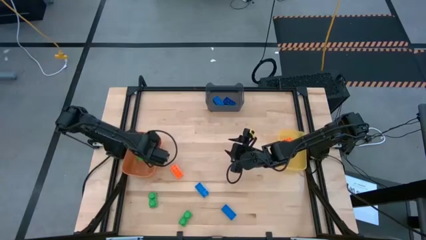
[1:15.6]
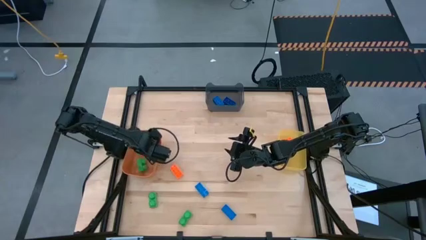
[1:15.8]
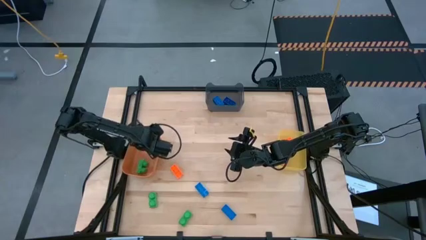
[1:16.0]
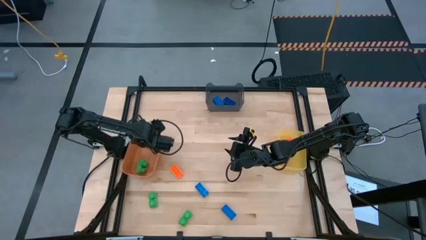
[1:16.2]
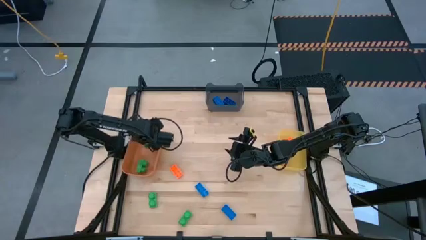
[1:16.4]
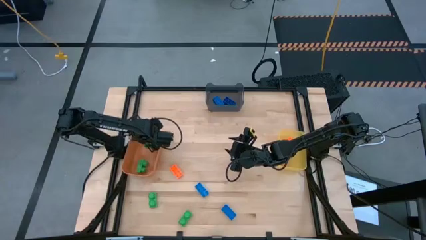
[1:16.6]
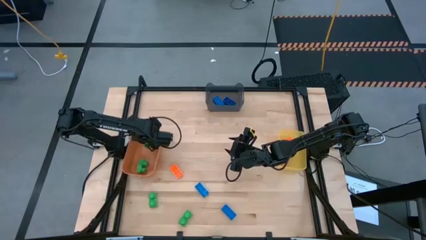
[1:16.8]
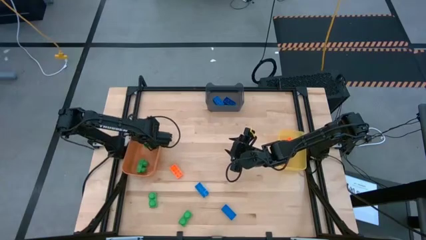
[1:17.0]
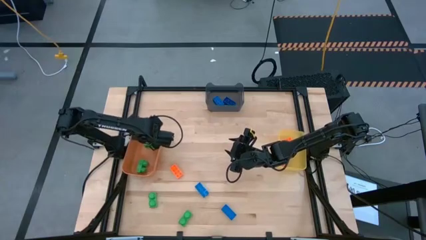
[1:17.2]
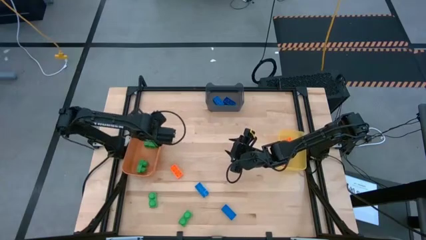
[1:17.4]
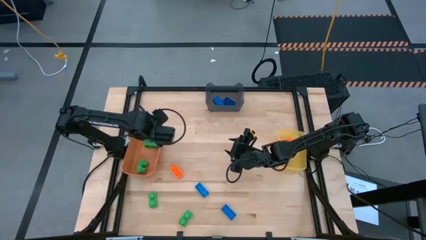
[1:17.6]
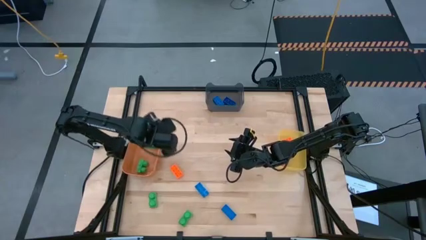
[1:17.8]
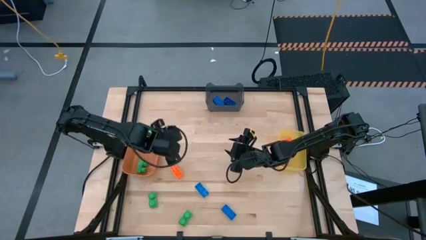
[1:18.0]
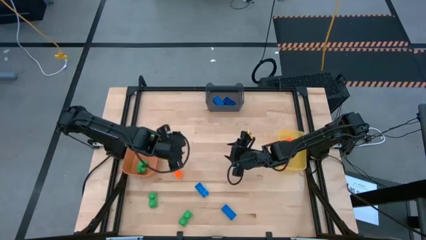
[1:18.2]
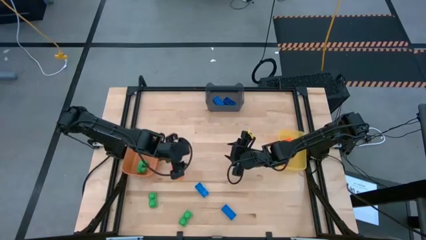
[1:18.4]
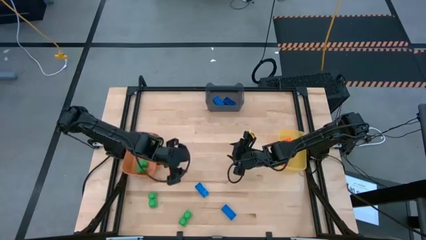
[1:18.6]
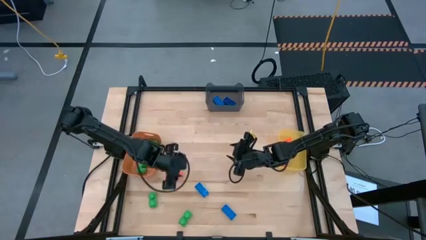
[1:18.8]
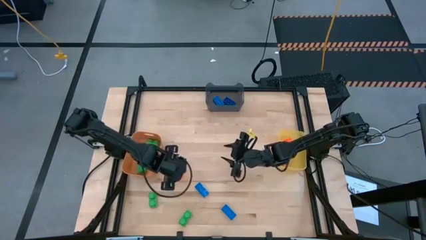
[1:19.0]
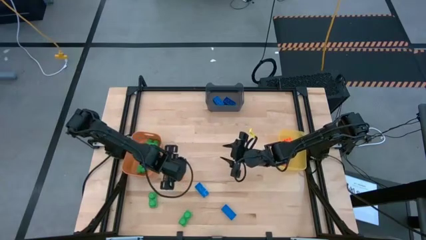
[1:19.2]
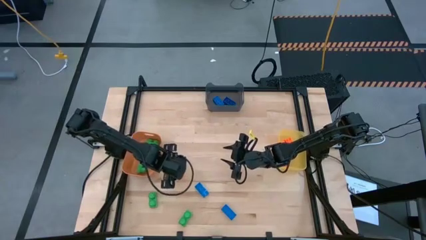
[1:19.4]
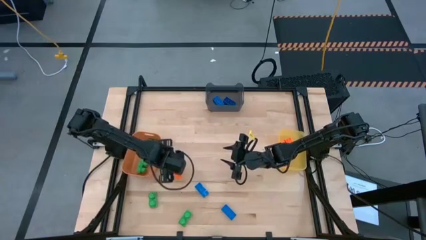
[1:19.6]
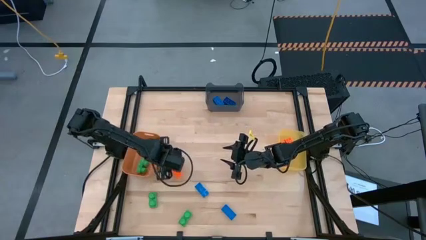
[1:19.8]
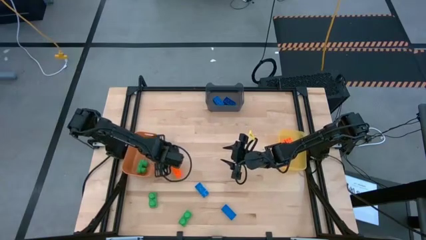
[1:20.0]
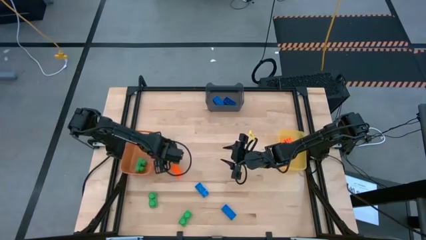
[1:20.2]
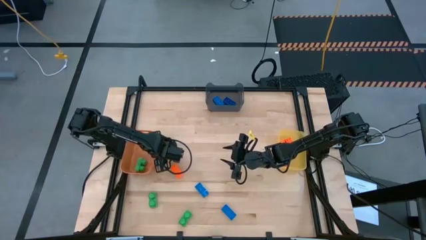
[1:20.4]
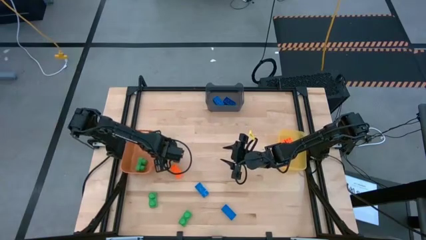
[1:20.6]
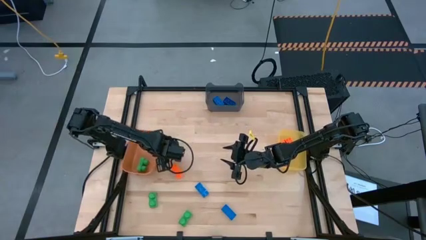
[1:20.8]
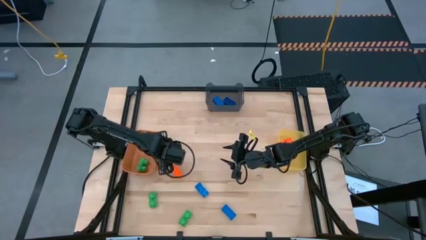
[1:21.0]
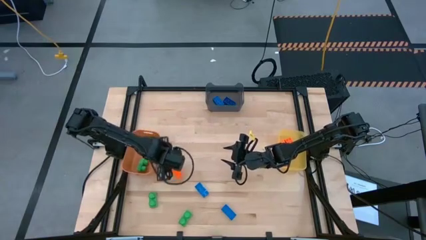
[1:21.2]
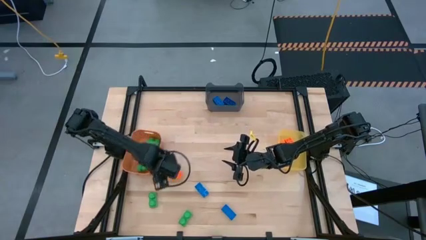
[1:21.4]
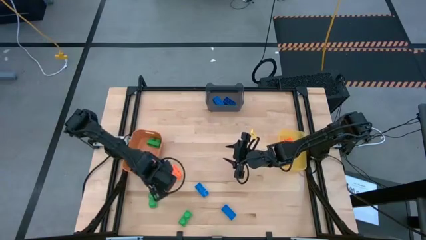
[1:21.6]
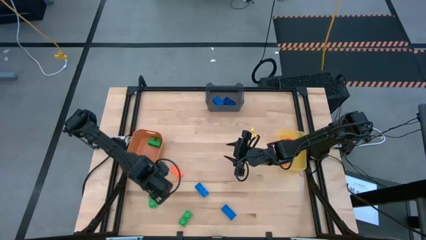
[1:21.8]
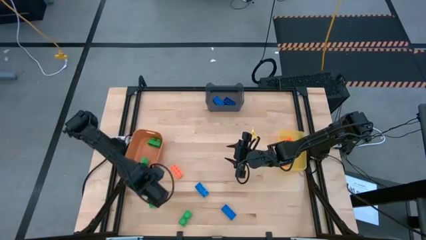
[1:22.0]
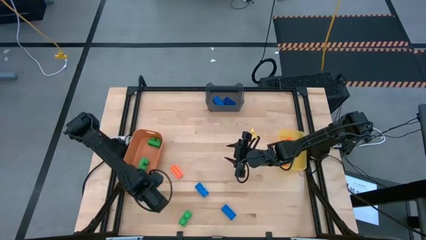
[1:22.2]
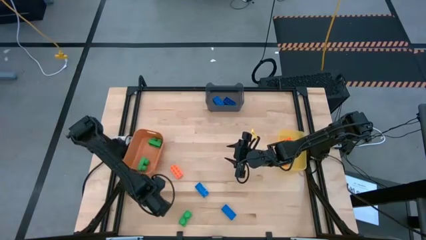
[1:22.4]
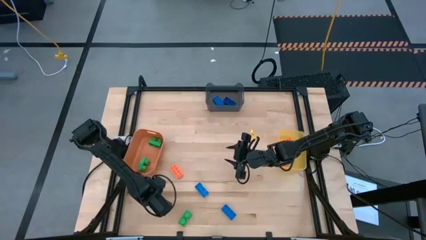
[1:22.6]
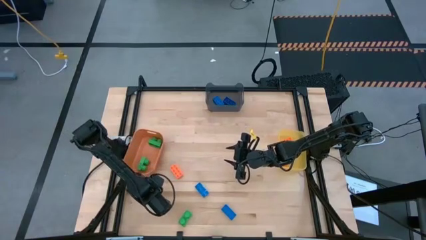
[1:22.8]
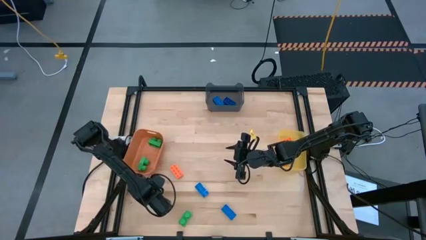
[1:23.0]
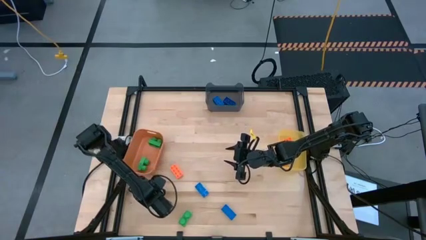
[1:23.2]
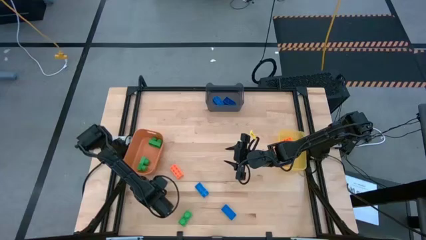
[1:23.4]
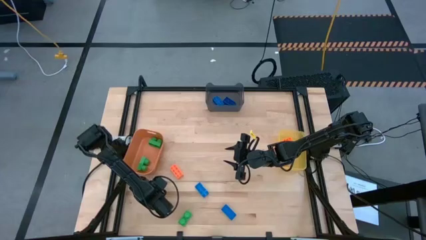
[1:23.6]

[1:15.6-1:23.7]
Task: Sort & place blocks by color
Put the green game piece into the orange bin

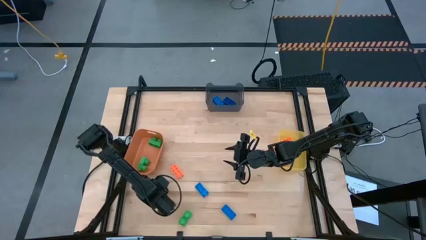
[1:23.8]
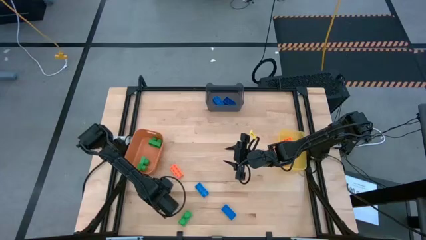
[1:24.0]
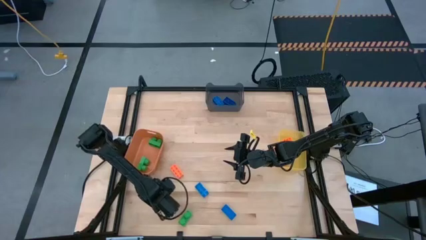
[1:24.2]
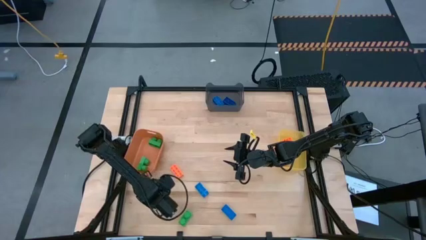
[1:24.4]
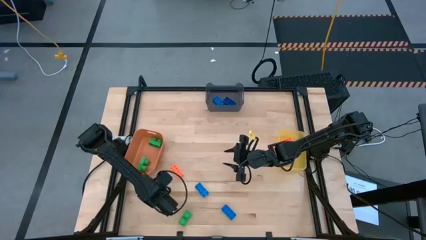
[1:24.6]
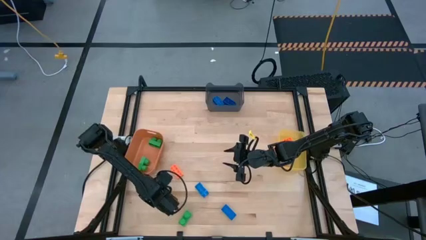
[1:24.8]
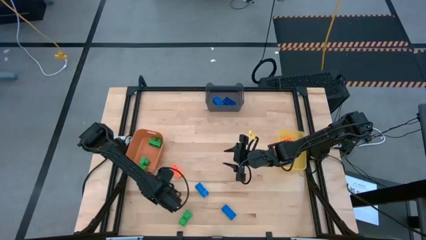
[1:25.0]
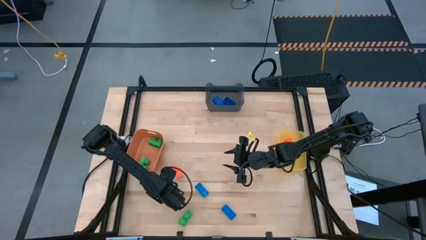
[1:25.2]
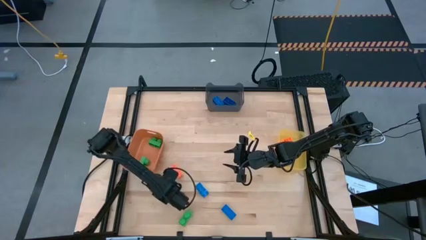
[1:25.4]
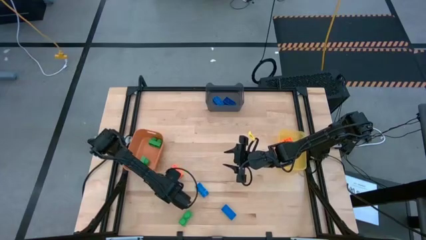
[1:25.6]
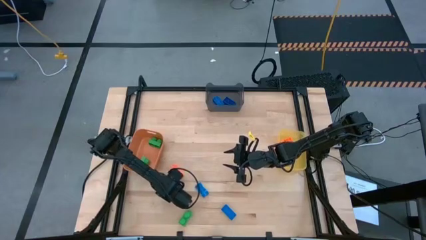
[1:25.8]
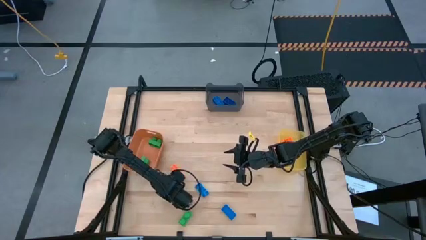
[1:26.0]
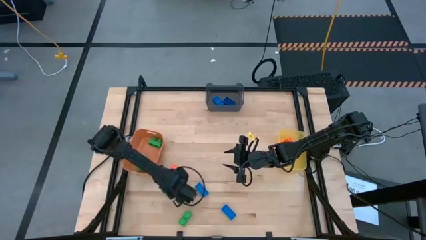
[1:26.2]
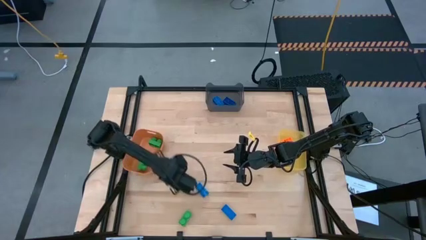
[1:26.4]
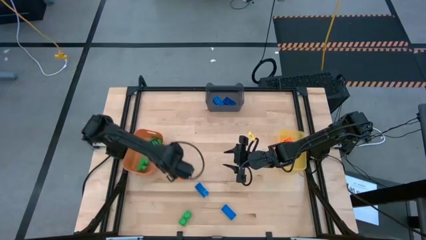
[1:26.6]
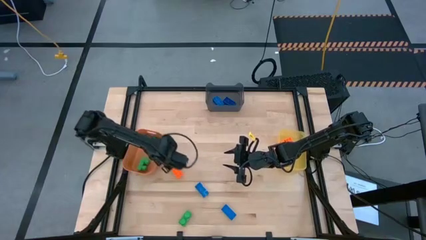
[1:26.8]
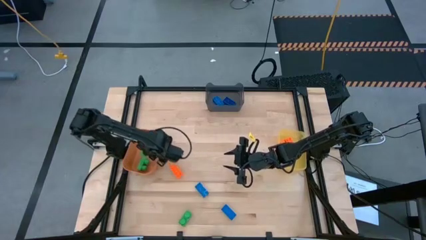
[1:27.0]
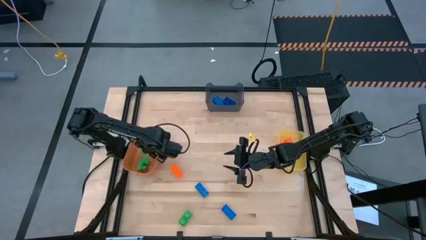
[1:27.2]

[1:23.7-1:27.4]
Put the green game piece into the orange bin

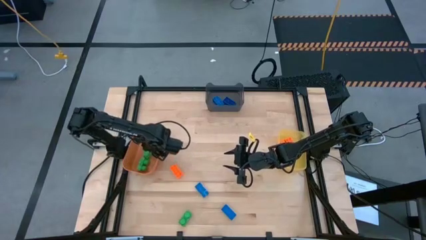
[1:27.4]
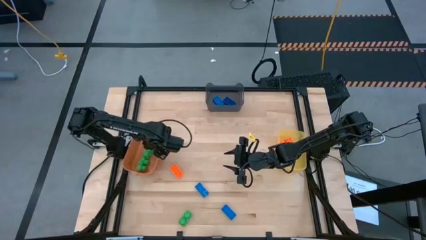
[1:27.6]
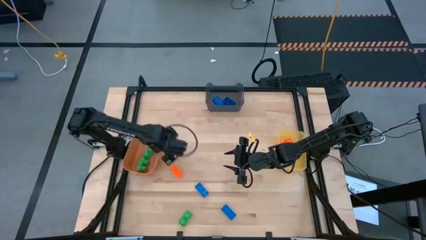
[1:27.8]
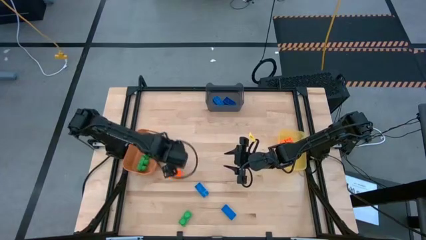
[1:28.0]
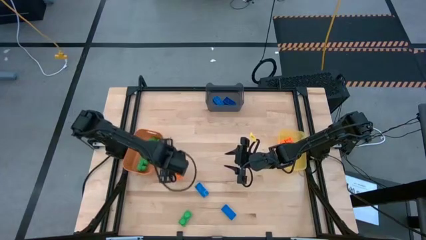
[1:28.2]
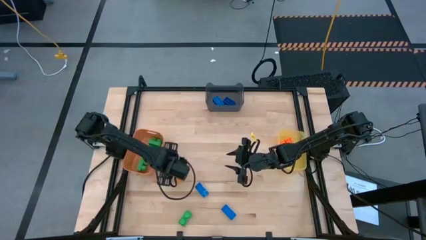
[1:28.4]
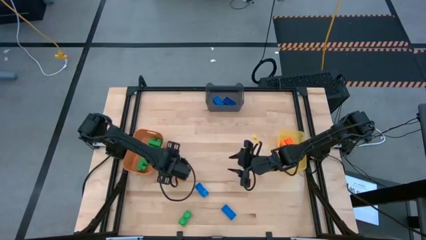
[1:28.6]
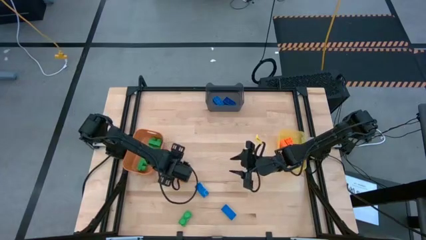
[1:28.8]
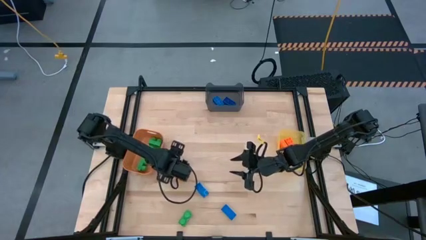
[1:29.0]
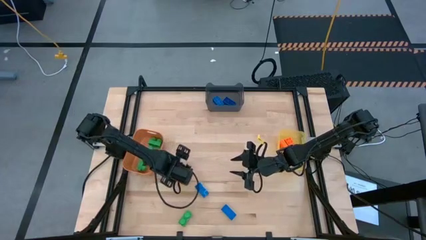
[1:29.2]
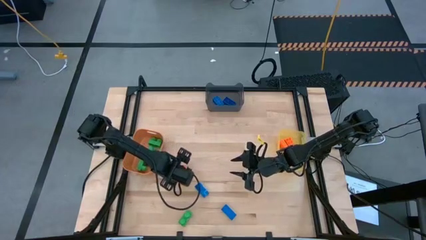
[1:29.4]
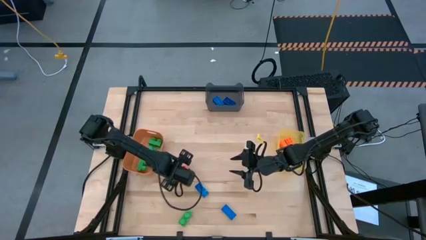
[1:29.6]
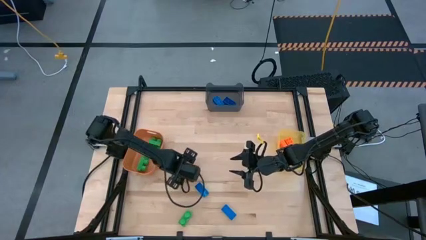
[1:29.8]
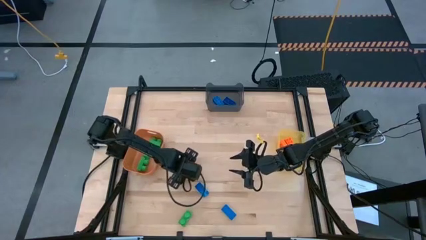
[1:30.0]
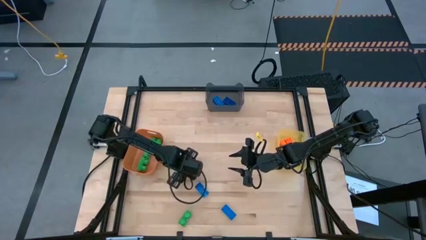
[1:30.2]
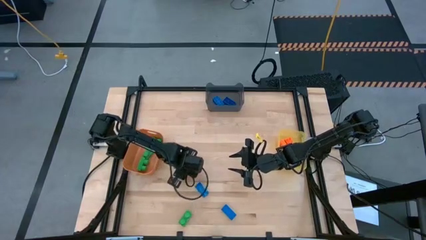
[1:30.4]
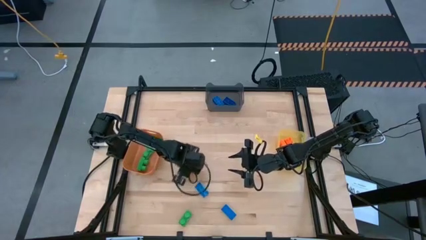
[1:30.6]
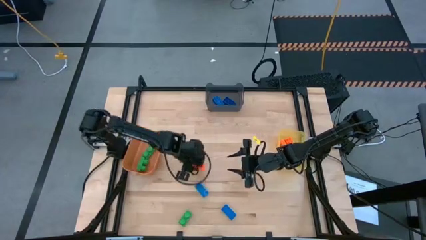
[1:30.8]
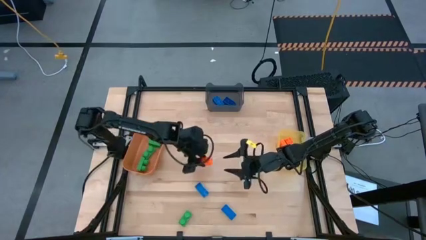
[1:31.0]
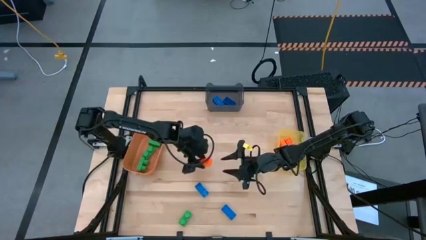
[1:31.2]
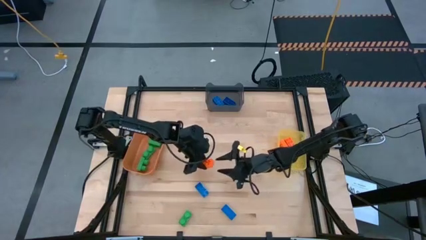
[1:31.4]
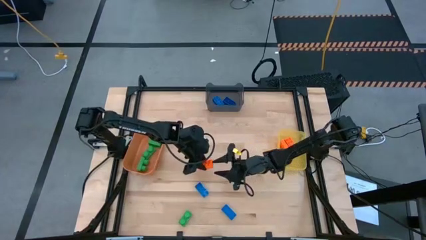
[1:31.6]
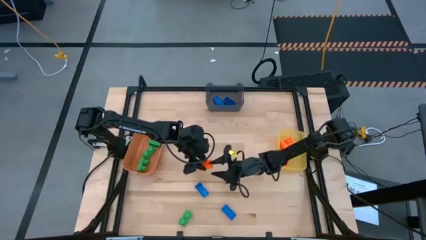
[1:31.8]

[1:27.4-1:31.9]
Put the orange game piece into the yellow bin
